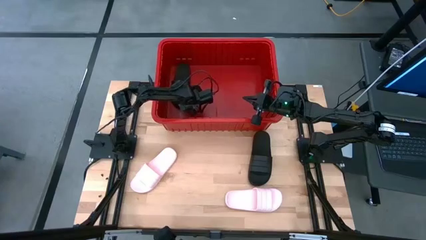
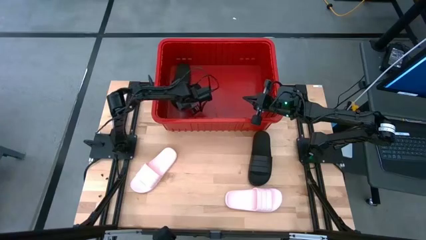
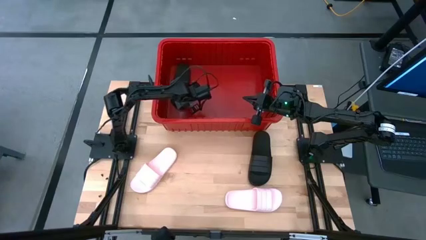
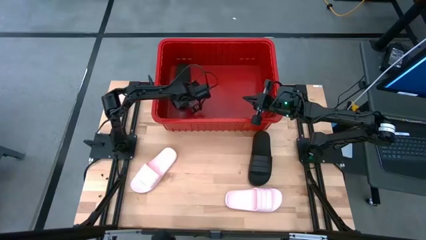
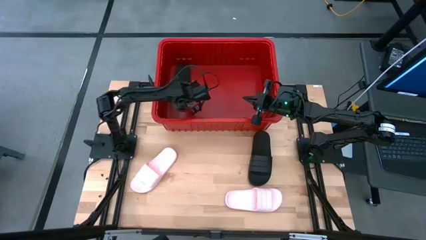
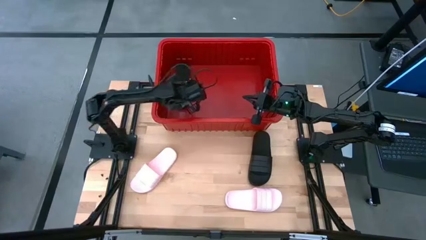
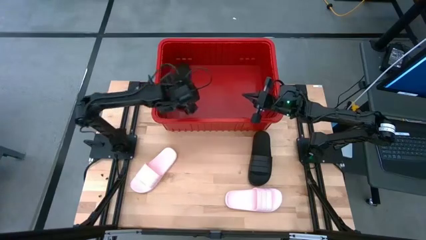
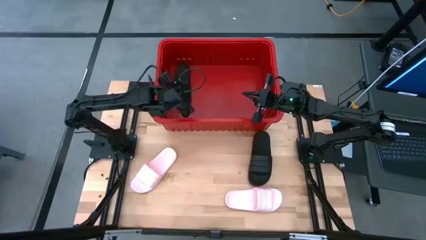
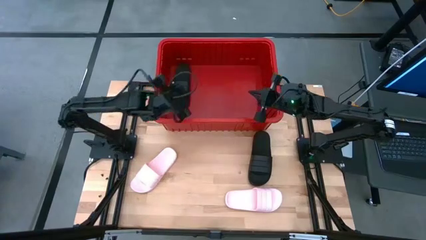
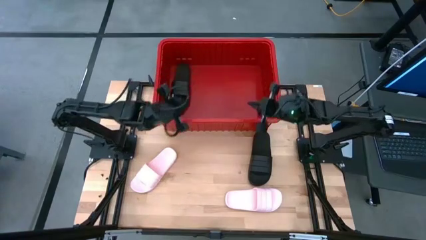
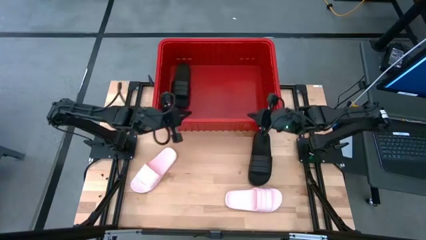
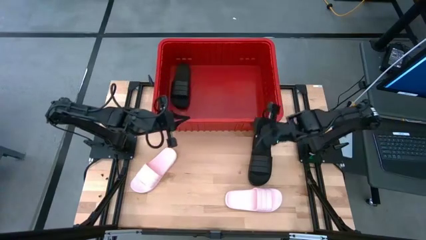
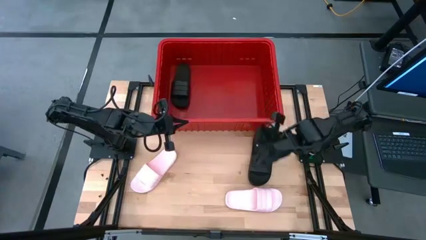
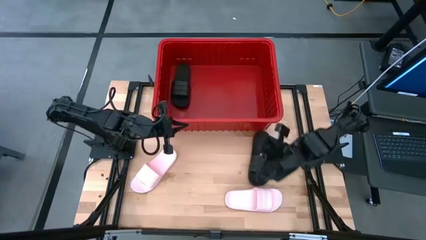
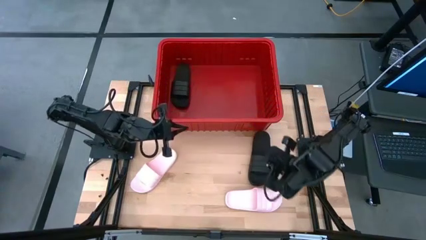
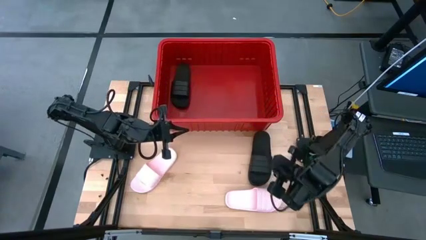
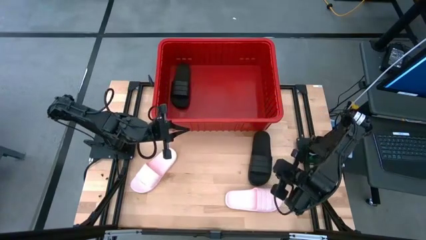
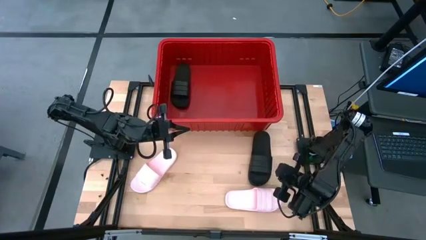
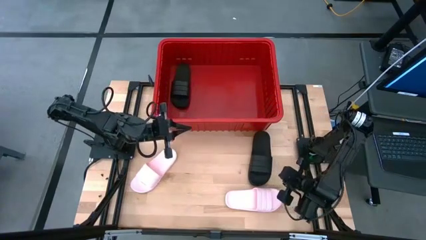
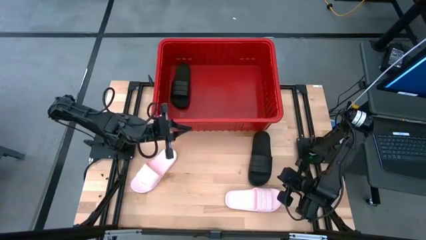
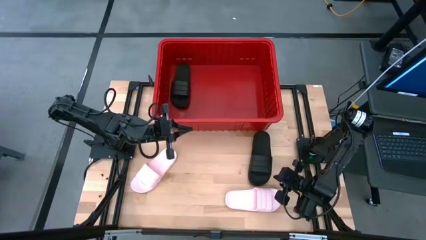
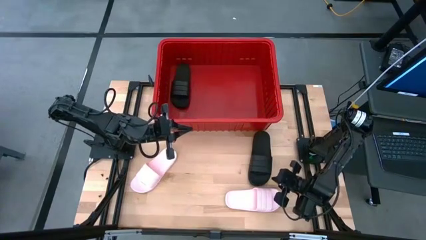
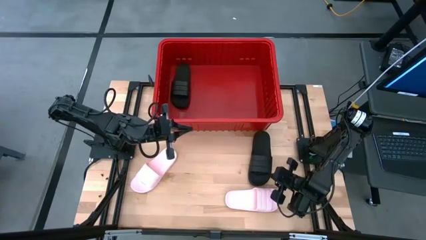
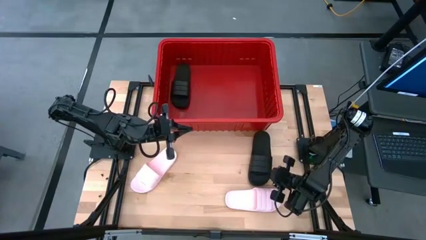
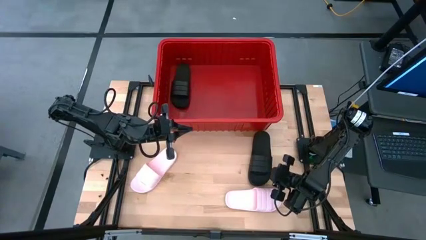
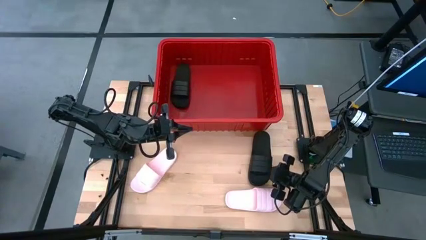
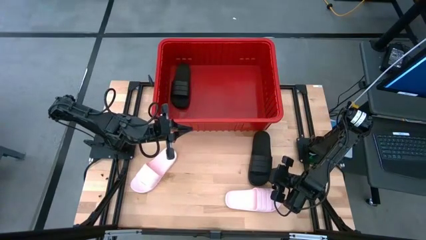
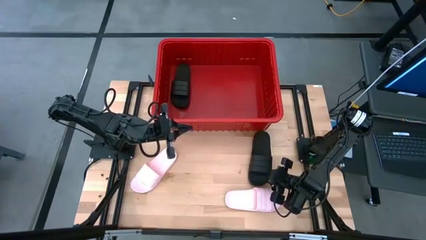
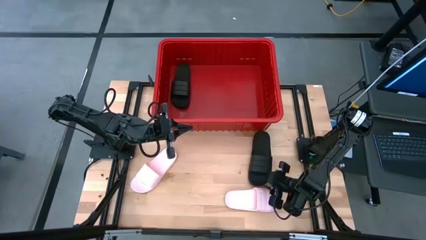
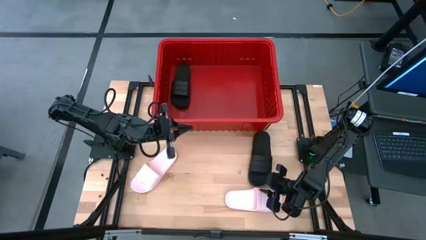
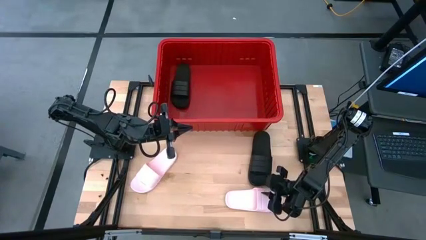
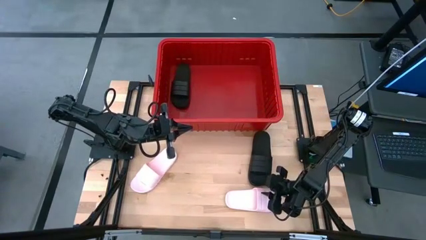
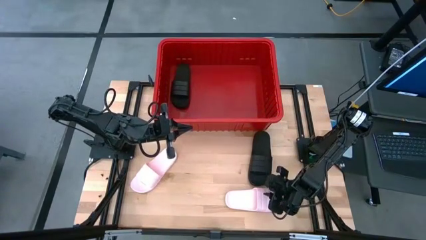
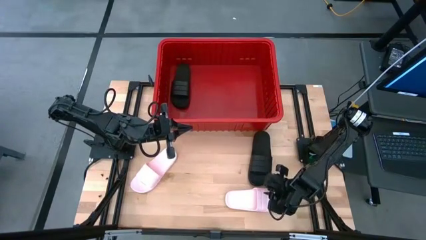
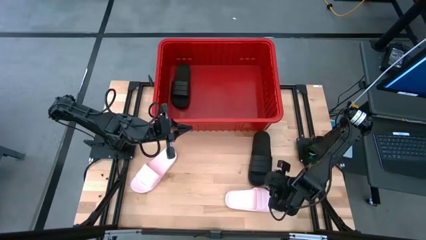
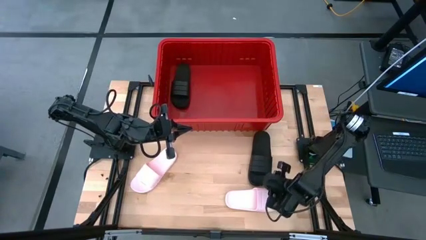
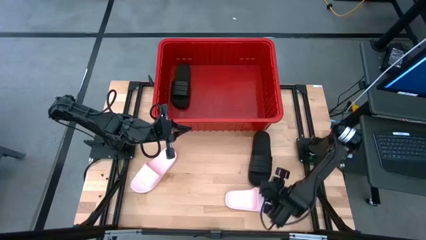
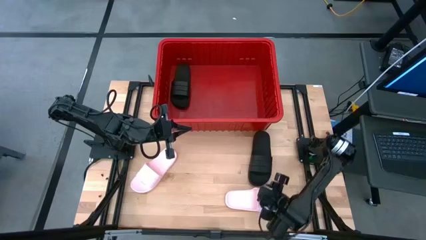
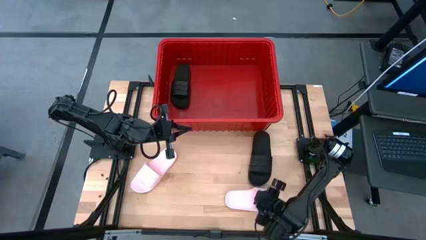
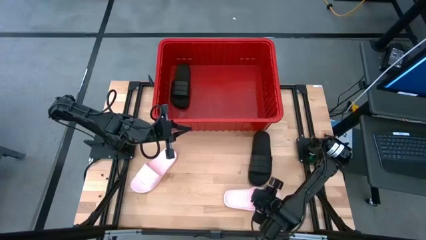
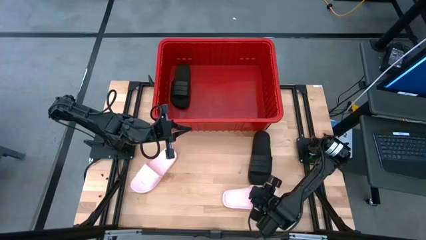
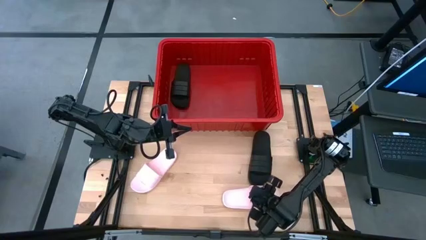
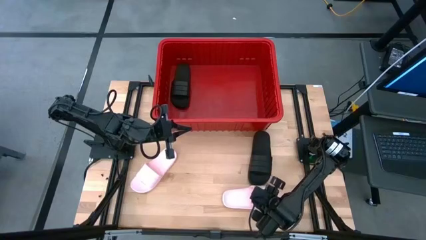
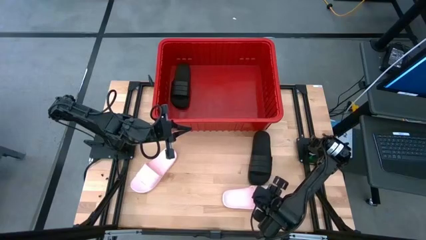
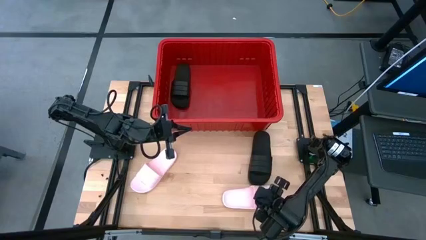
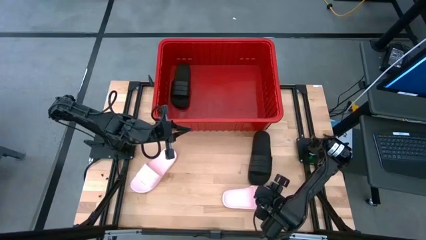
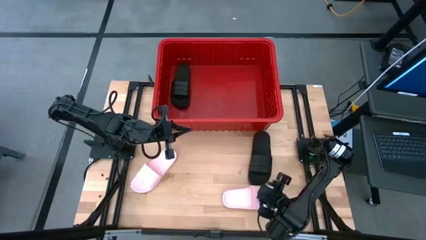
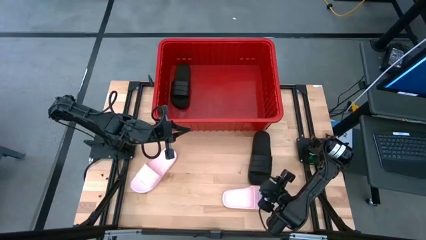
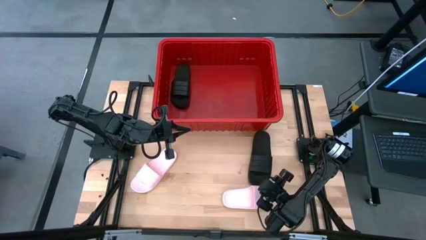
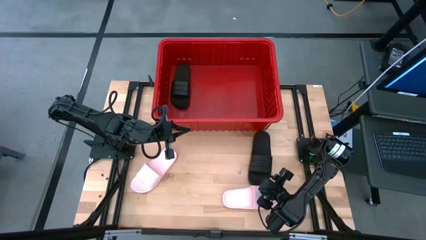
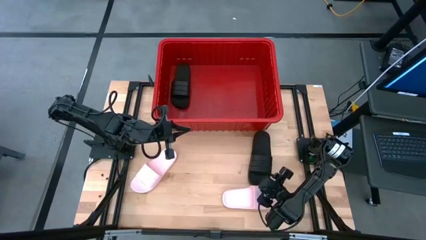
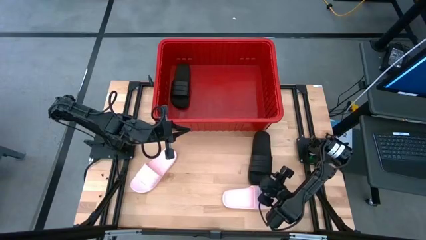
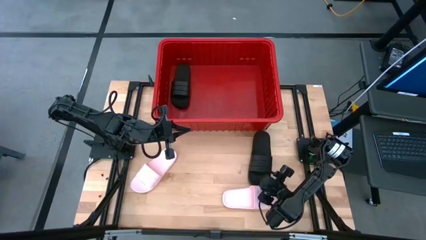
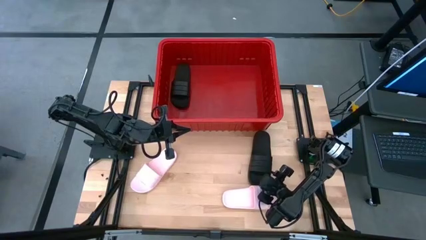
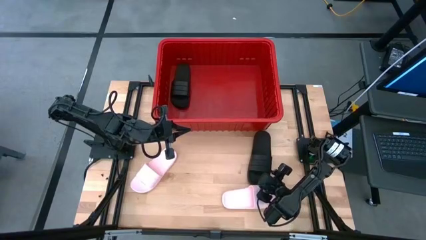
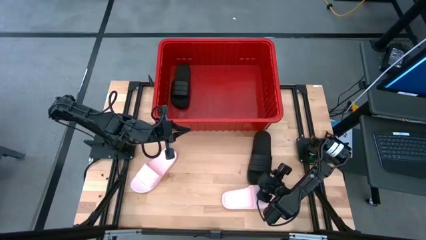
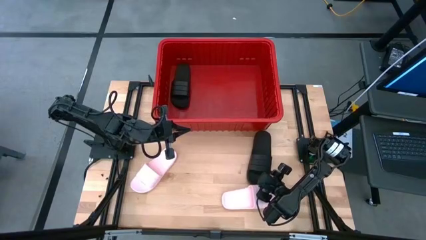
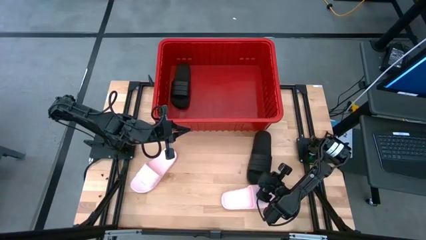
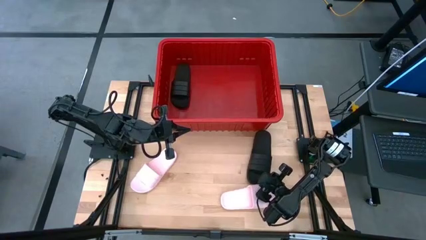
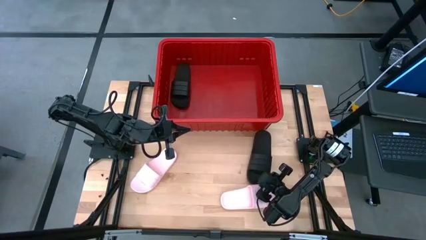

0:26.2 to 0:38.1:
Task: Pick and place slides into bin
Put the black slides into the red bin

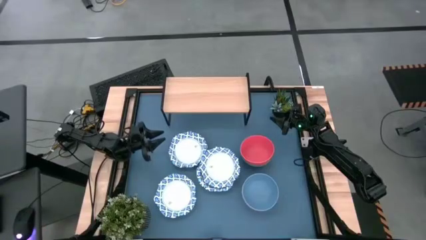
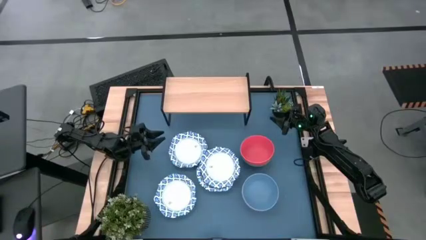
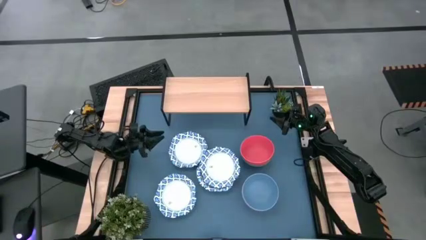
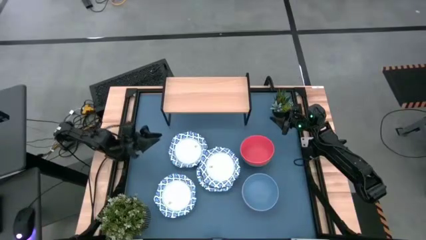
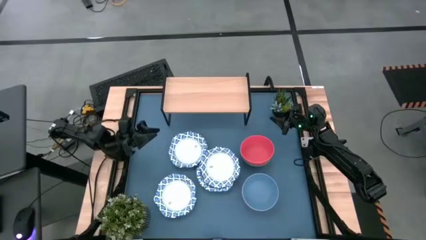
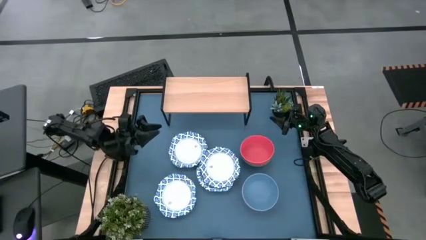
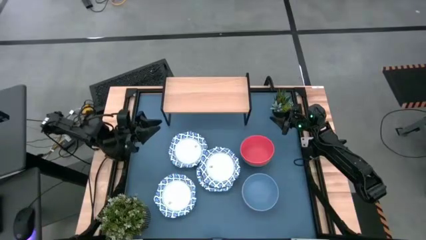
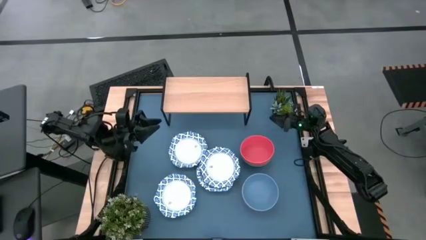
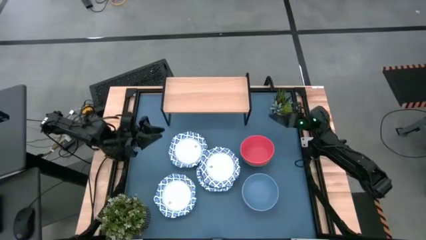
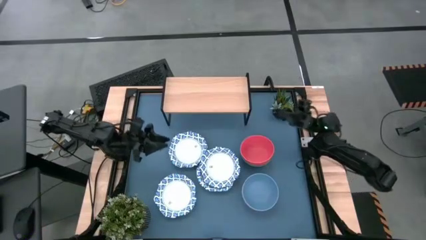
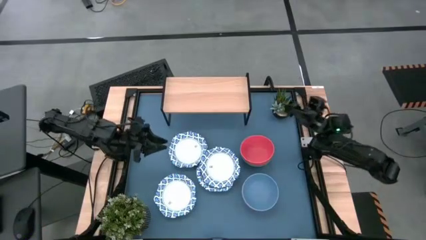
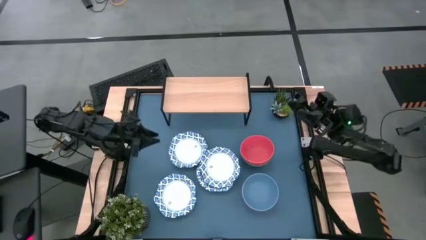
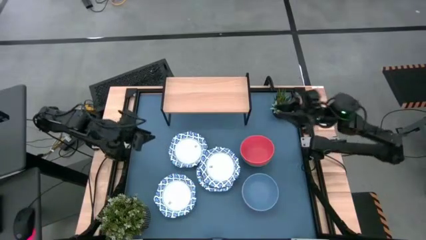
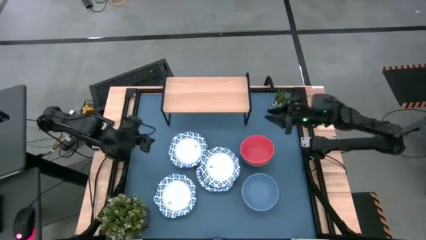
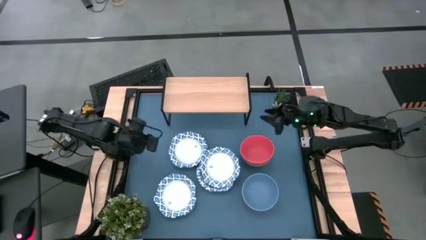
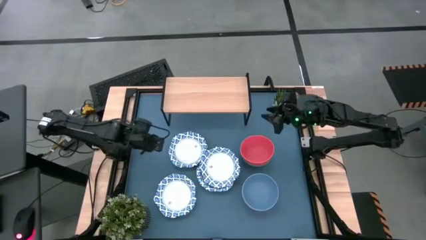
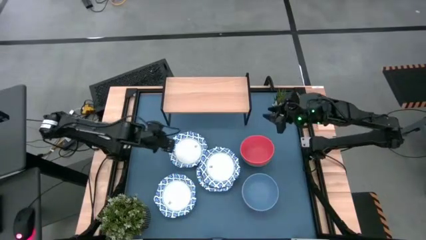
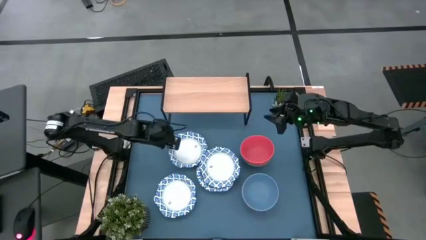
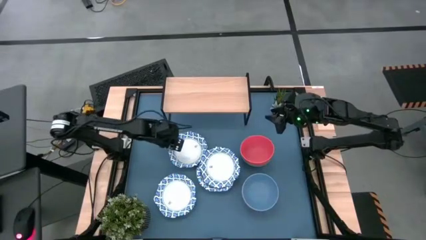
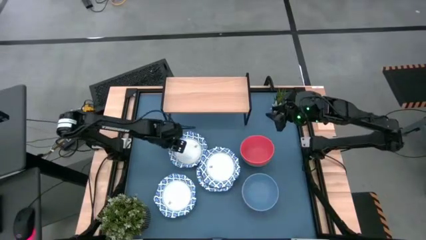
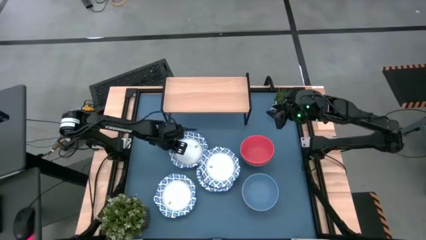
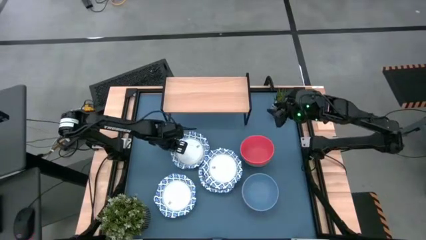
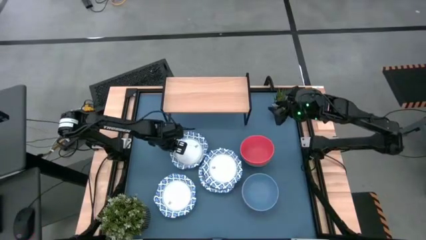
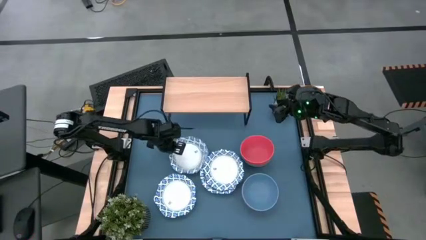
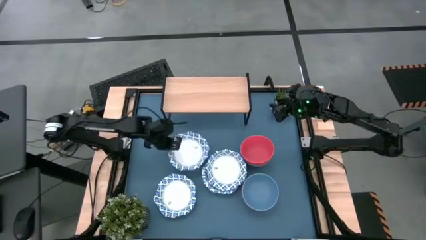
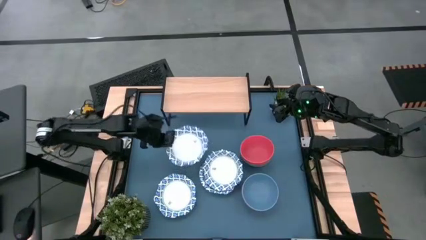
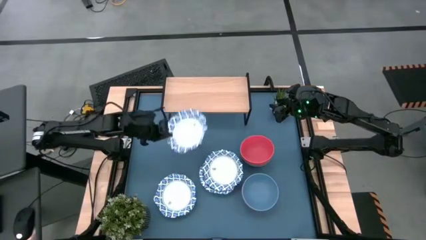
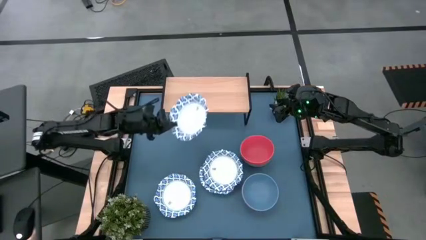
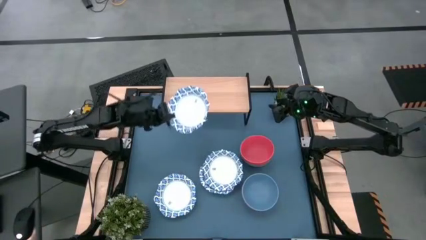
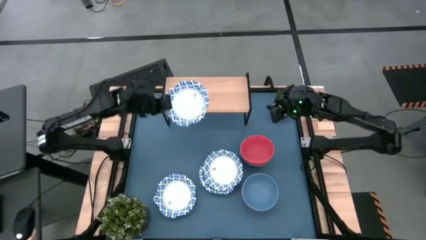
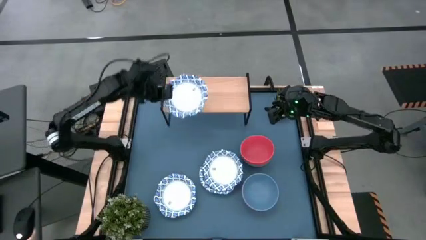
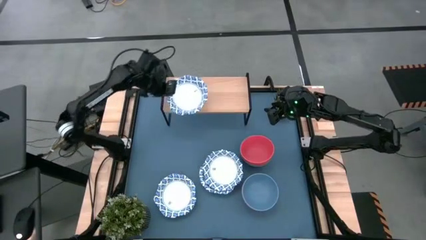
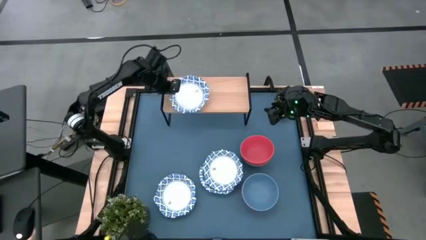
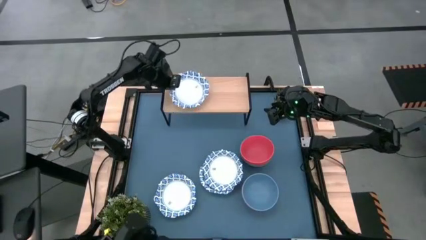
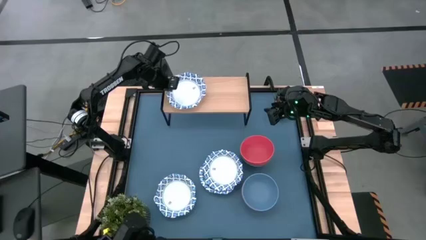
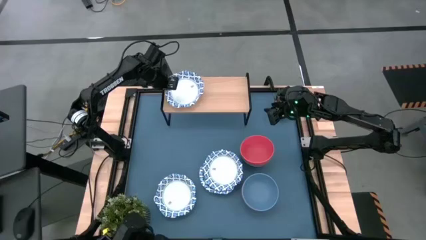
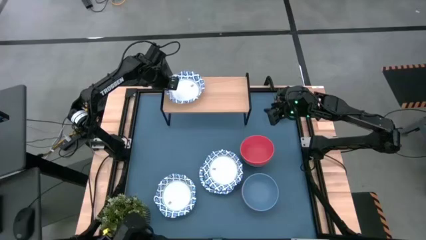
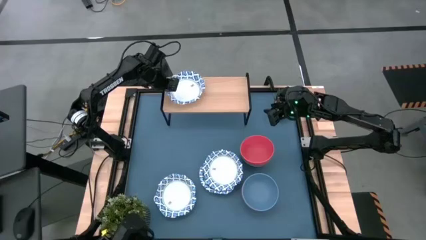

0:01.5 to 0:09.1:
Task: Place and stack bowls onto a shelf
Put the white bowl on the shelf
